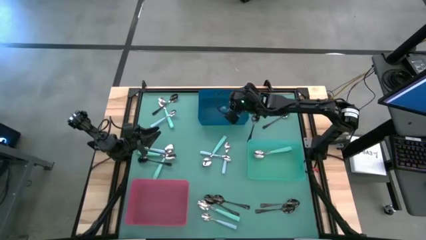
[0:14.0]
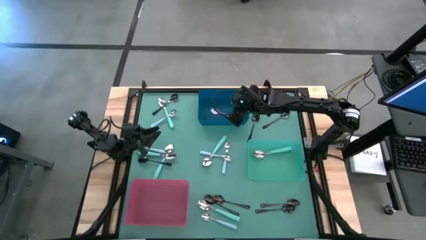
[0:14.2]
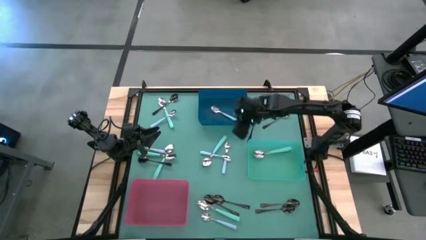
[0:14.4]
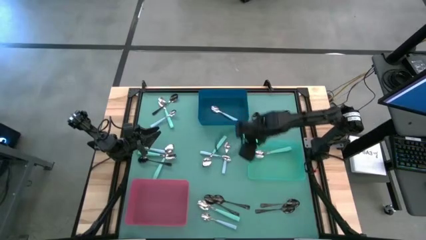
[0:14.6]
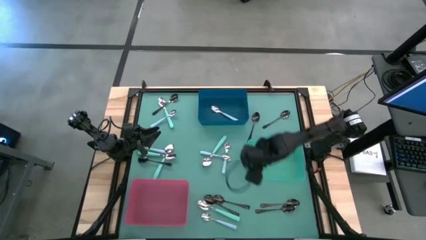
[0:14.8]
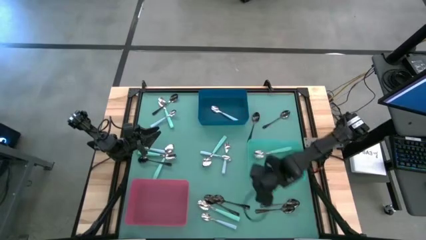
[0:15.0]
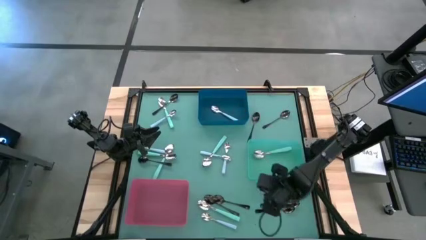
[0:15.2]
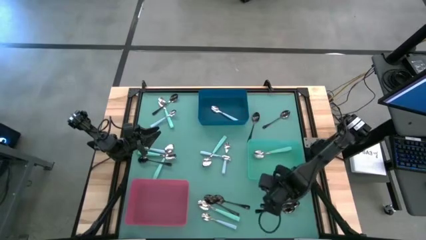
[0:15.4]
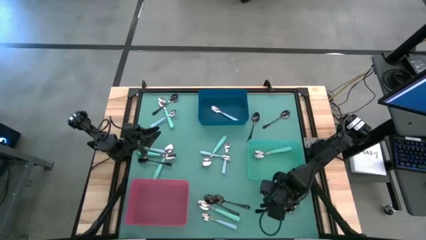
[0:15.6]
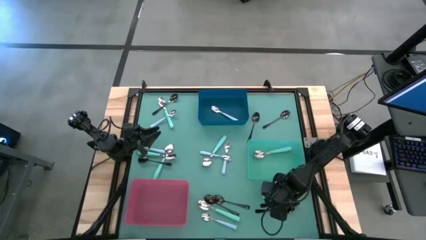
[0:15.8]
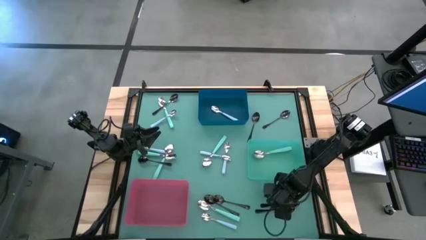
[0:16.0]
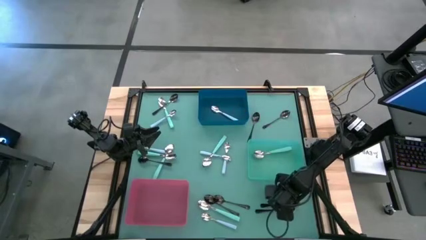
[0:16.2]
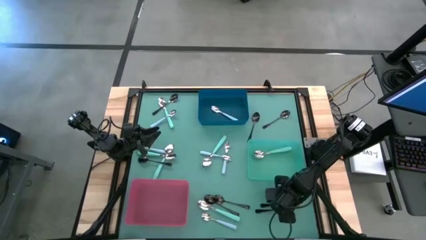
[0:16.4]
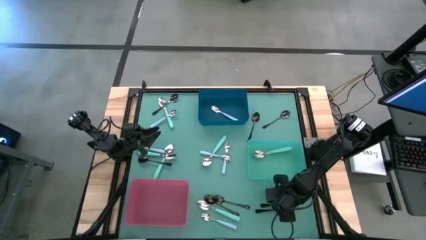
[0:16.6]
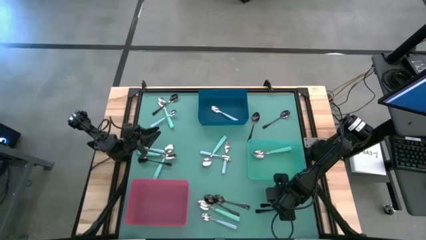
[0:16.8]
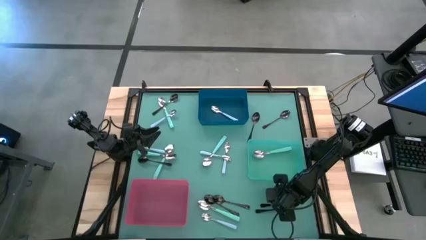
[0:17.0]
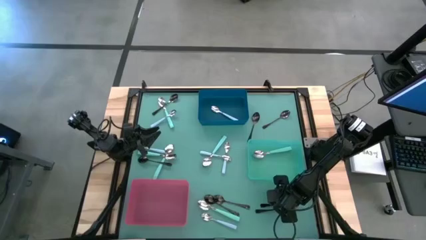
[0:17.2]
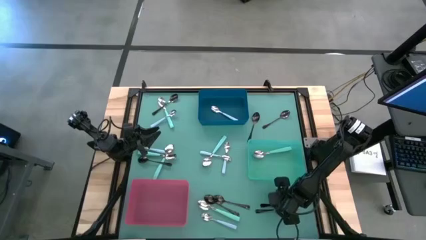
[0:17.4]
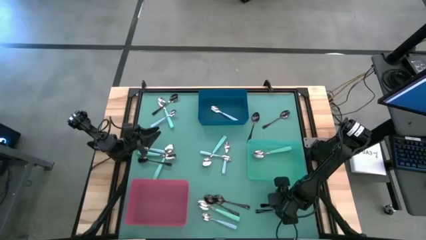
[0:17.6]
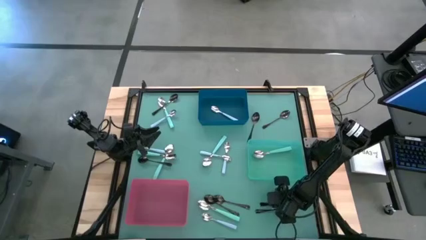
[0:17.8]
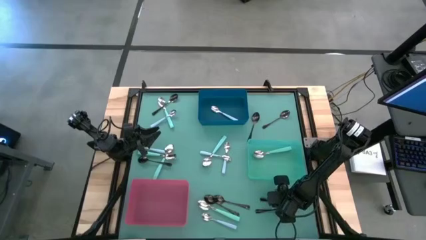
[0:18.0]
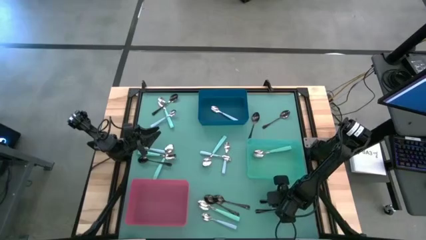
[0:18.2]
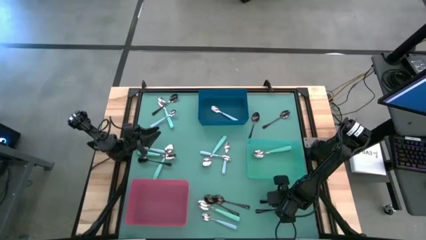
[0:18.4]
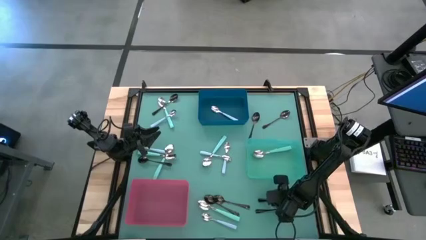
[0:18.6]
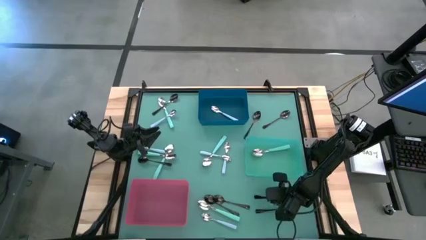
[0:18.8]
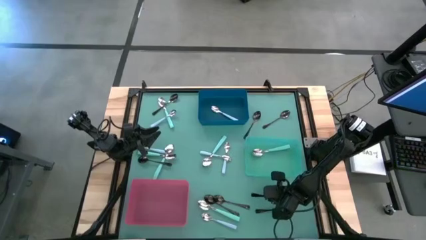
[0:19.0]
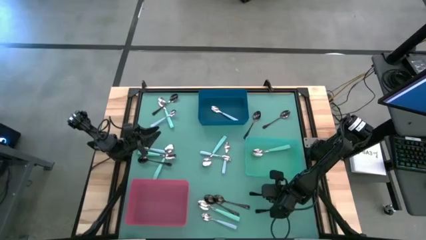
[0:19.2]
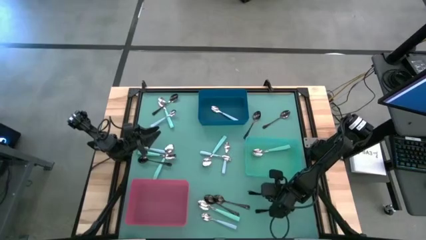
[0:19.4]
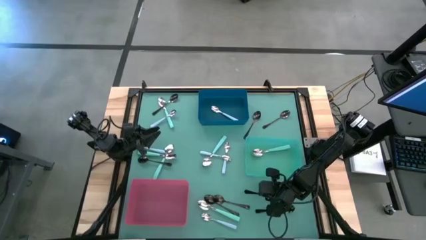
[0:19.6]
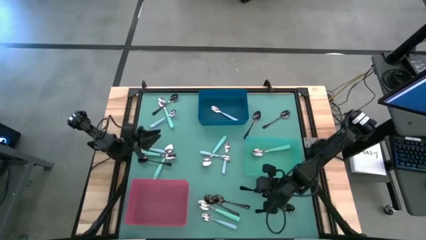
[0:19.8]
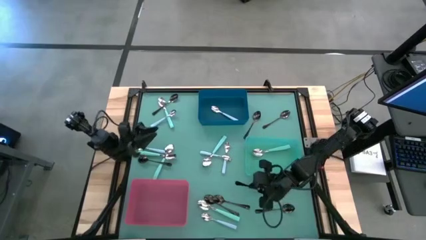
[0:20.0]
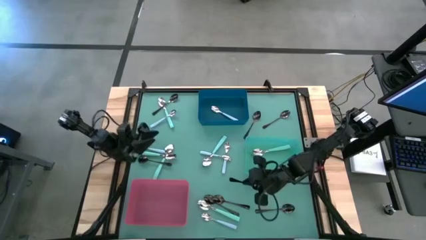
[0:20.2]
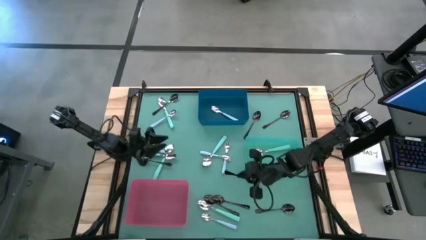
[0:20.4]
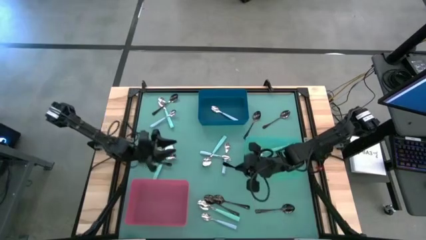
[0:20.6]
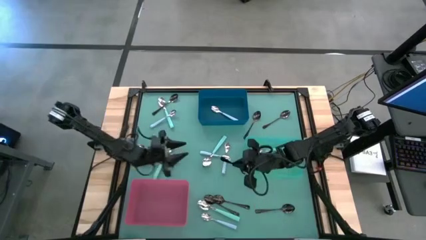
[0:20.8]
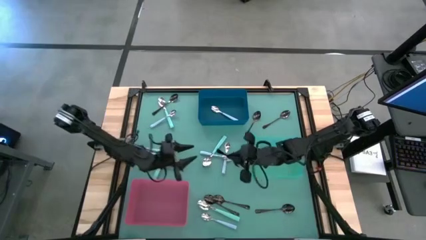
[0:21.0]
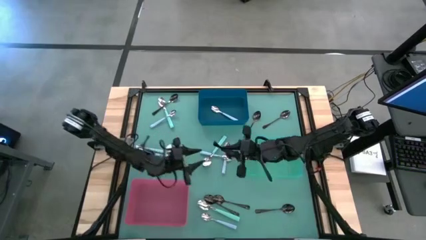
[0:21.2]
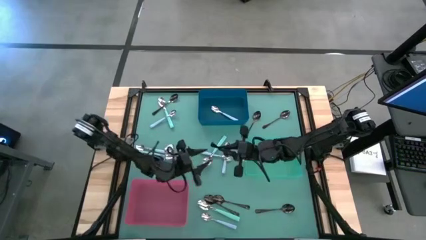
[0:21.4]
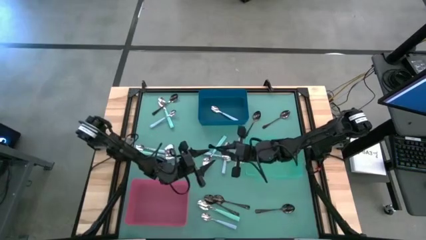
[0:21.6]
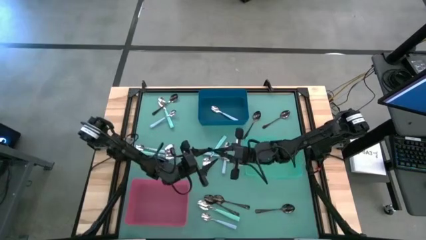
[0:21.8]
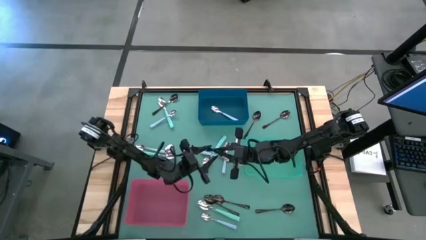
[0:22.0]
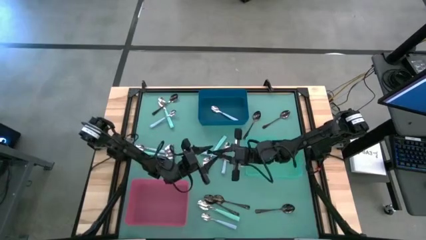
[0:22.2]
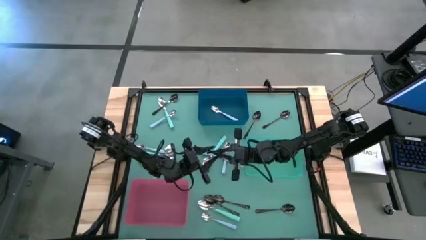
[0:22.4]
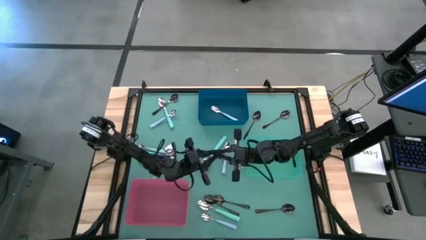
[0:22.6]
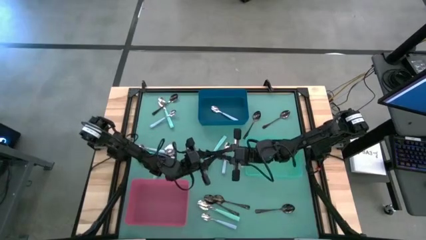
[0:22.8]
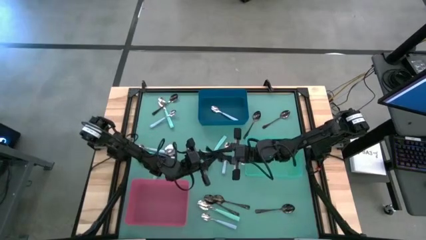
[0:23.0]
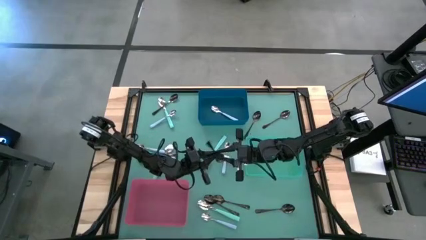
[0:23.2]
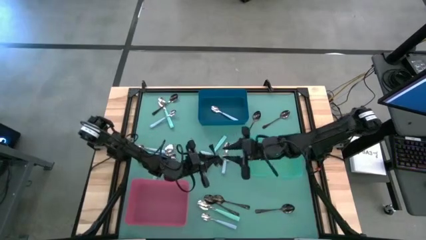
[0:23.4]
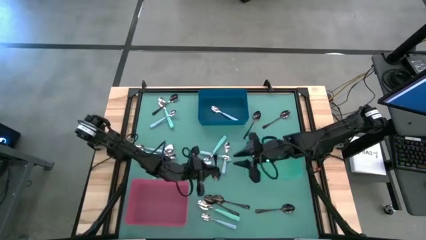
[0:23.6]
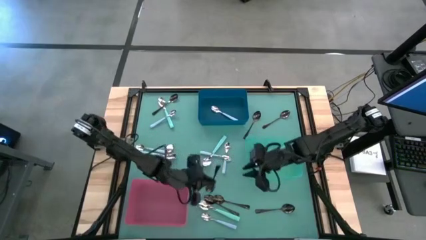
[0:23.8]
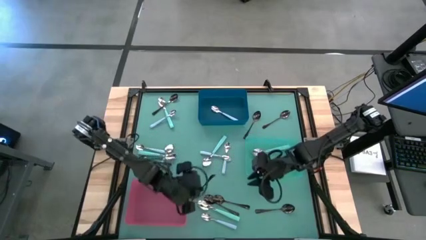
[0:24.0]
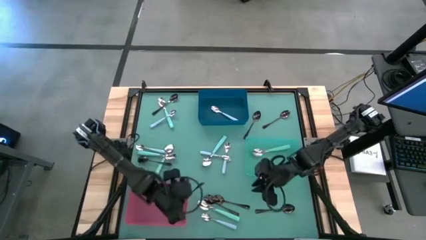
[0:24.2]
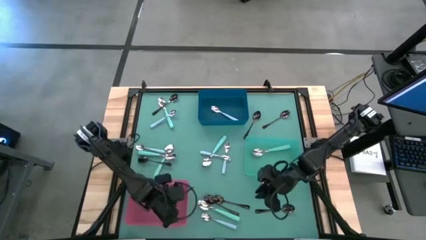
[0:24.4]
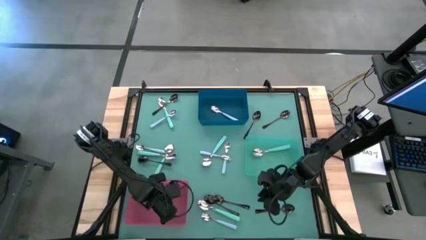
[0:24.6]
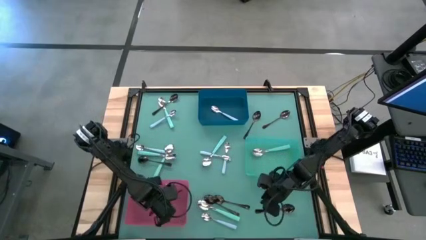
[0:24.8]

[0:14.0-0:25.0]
Task: Sort silverware by color (type)
Put the black spoon into the red bin
